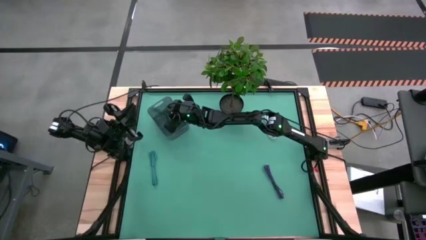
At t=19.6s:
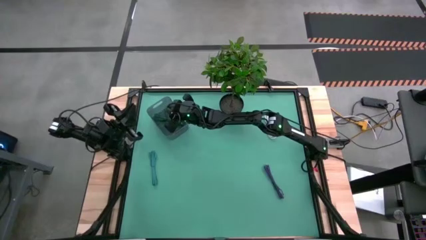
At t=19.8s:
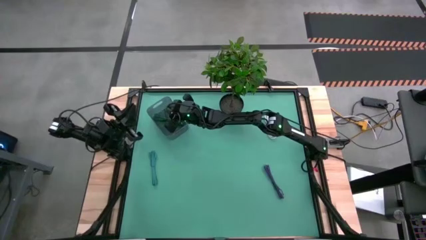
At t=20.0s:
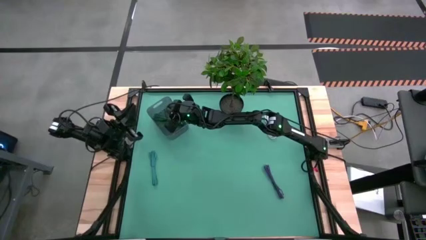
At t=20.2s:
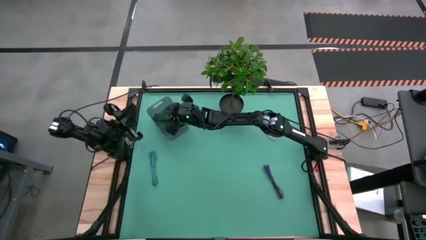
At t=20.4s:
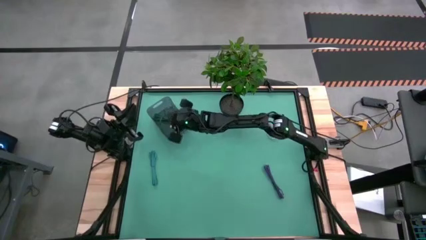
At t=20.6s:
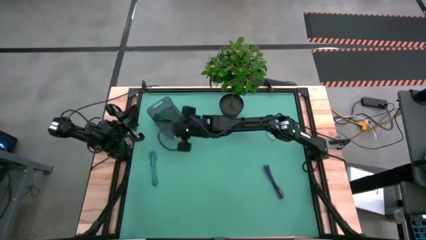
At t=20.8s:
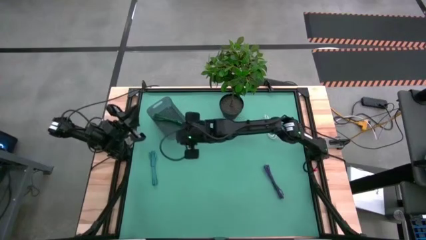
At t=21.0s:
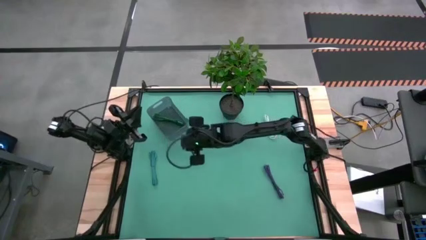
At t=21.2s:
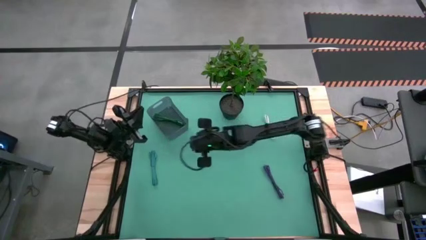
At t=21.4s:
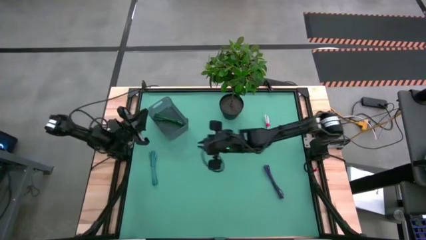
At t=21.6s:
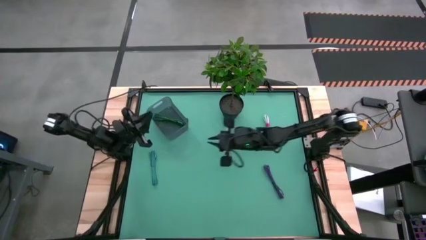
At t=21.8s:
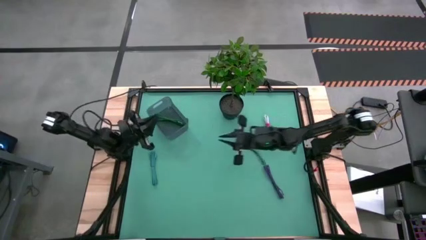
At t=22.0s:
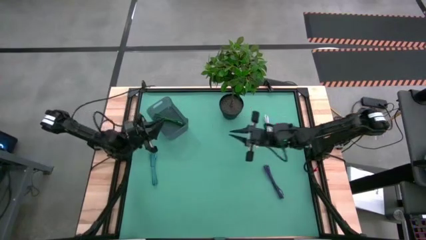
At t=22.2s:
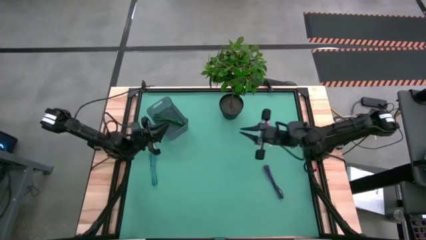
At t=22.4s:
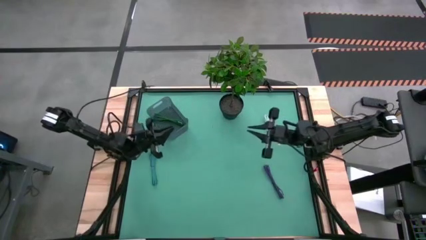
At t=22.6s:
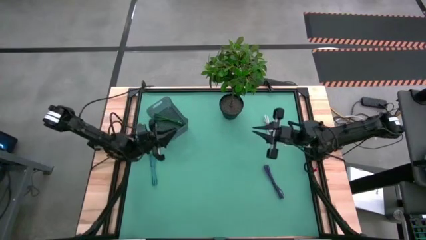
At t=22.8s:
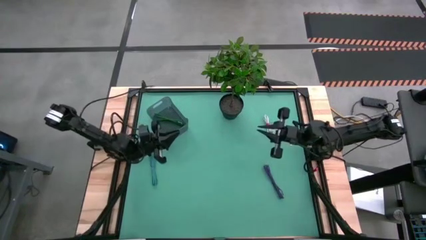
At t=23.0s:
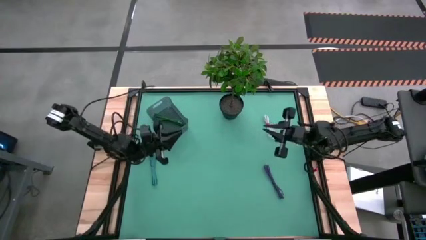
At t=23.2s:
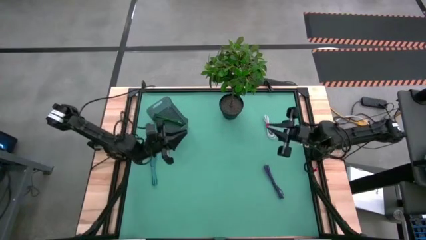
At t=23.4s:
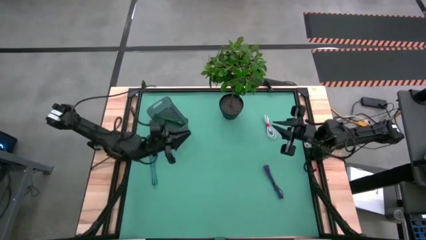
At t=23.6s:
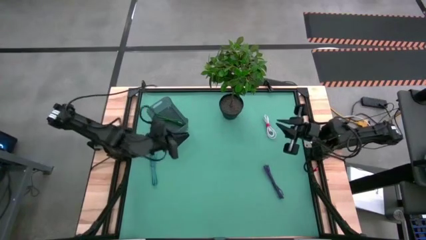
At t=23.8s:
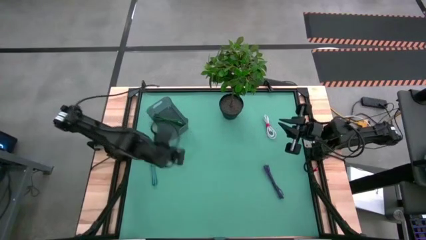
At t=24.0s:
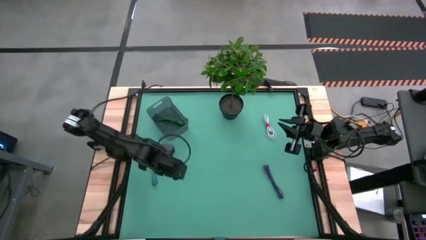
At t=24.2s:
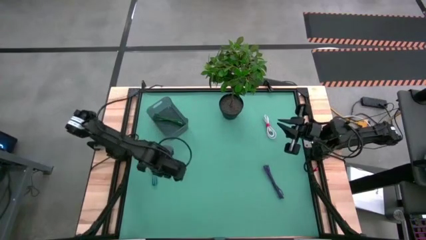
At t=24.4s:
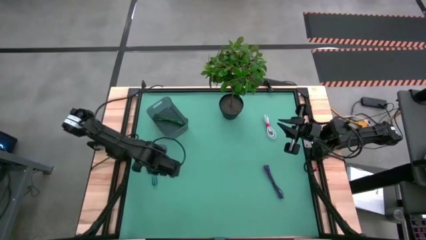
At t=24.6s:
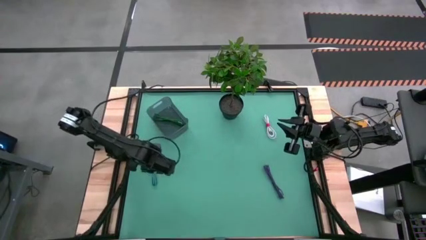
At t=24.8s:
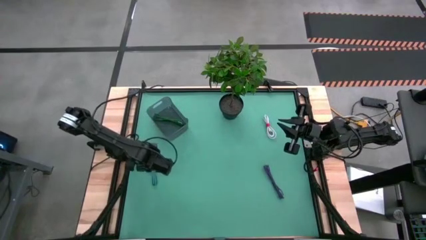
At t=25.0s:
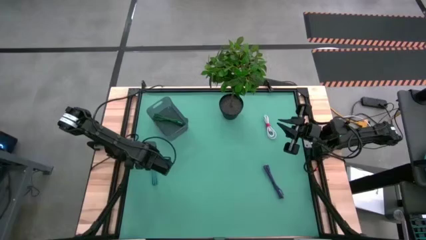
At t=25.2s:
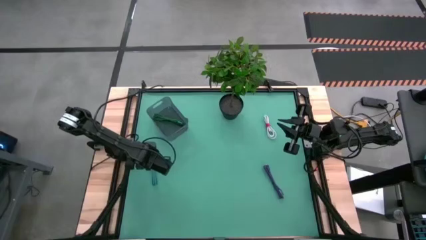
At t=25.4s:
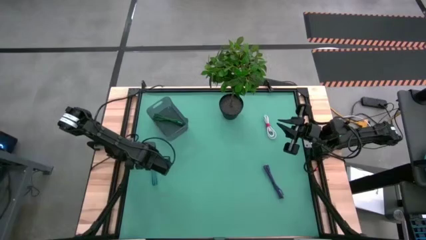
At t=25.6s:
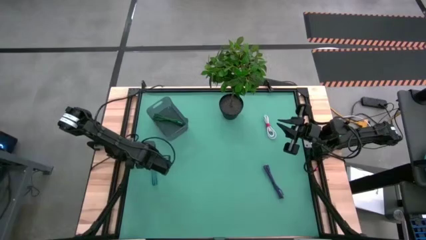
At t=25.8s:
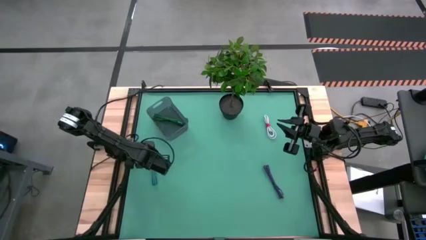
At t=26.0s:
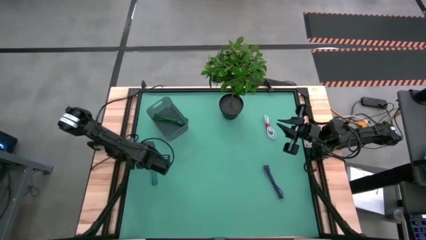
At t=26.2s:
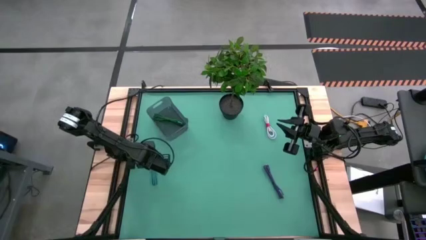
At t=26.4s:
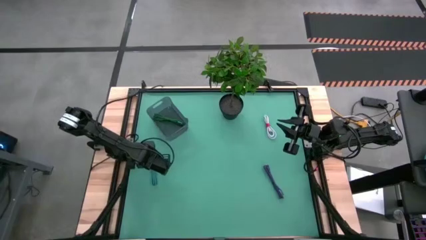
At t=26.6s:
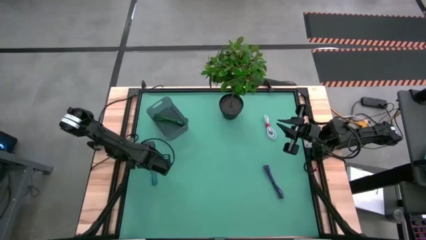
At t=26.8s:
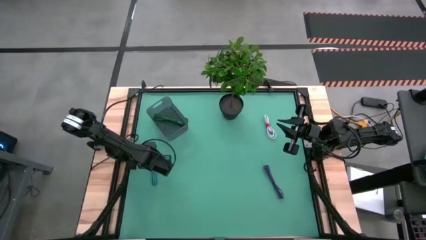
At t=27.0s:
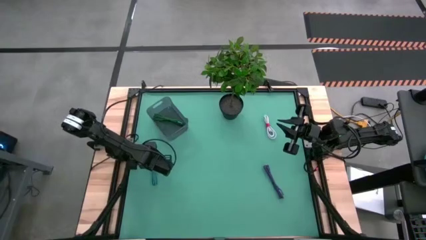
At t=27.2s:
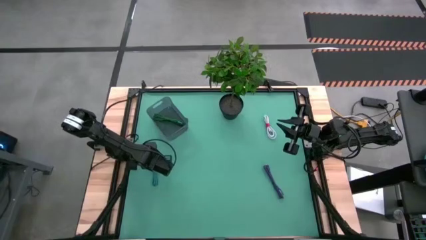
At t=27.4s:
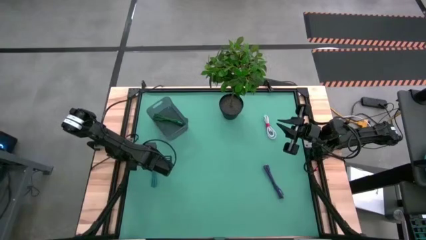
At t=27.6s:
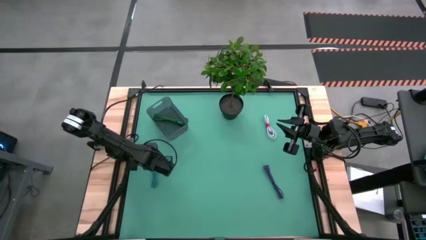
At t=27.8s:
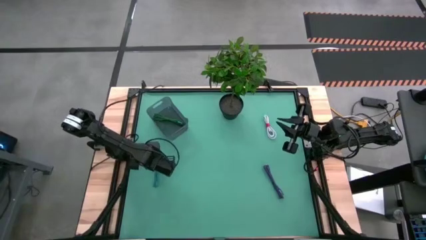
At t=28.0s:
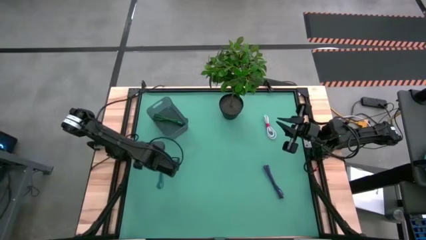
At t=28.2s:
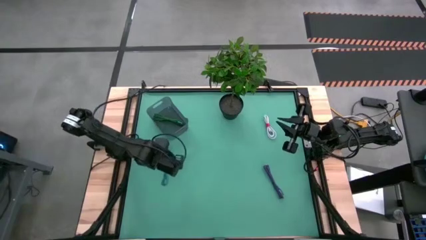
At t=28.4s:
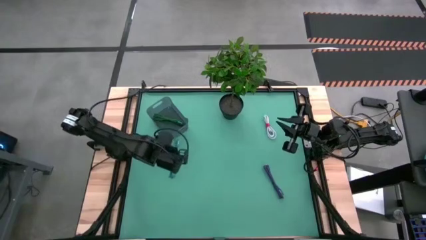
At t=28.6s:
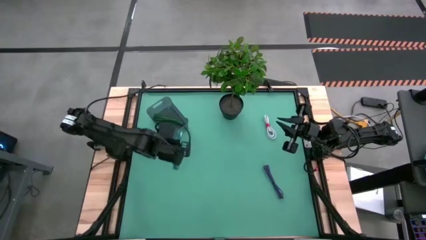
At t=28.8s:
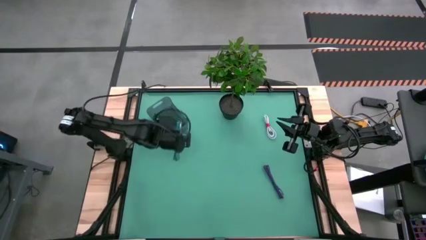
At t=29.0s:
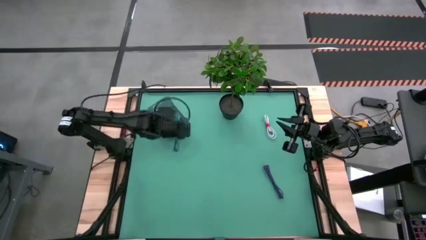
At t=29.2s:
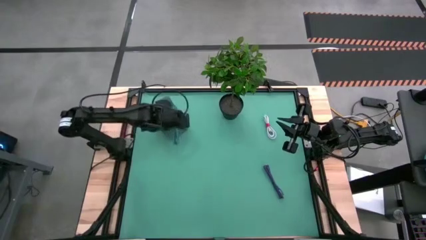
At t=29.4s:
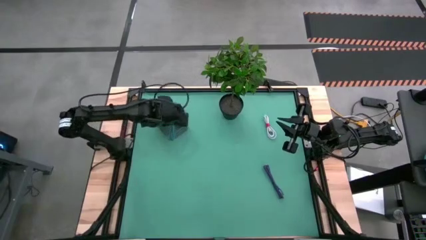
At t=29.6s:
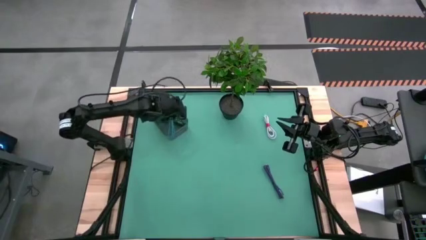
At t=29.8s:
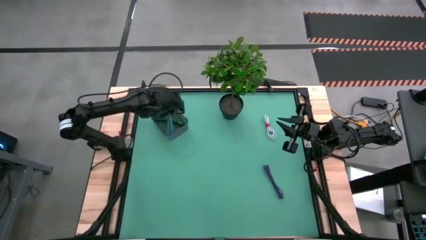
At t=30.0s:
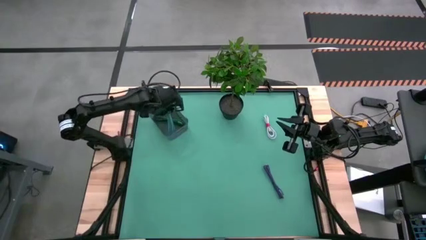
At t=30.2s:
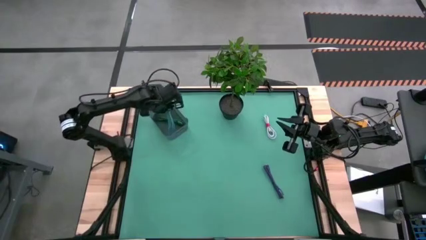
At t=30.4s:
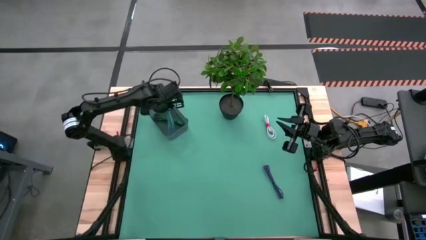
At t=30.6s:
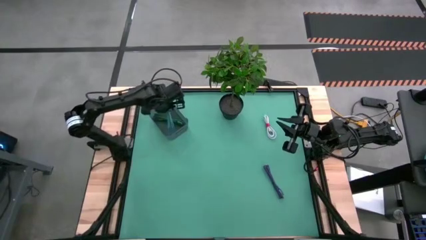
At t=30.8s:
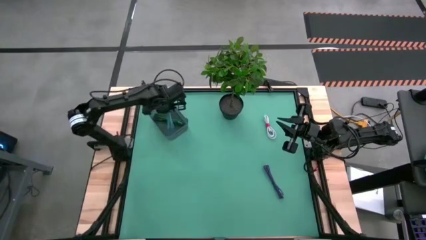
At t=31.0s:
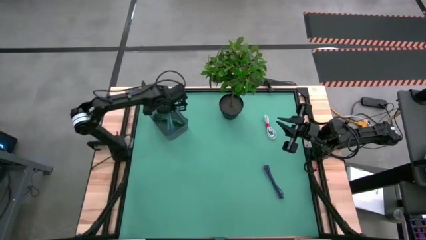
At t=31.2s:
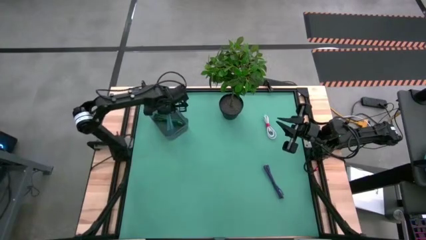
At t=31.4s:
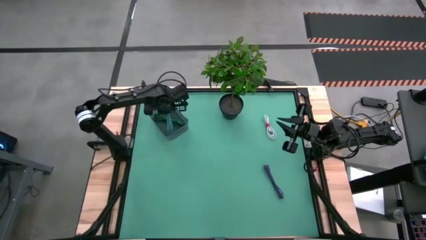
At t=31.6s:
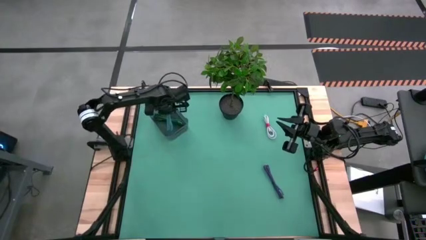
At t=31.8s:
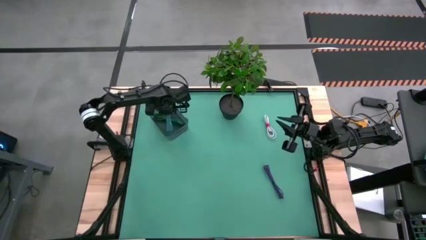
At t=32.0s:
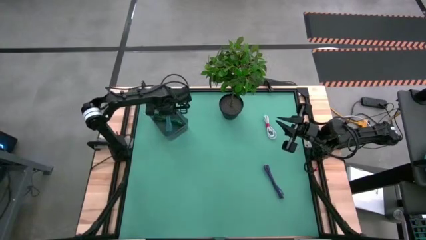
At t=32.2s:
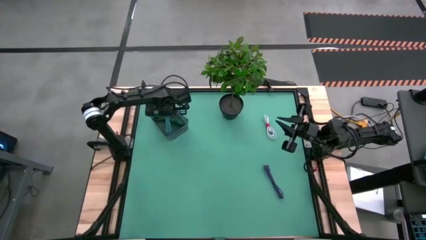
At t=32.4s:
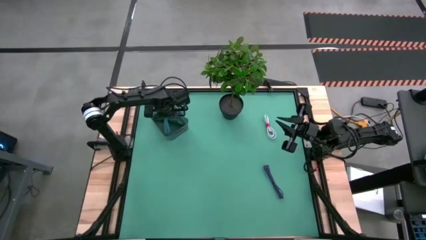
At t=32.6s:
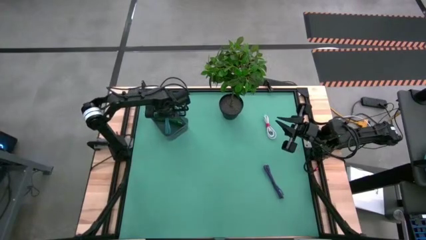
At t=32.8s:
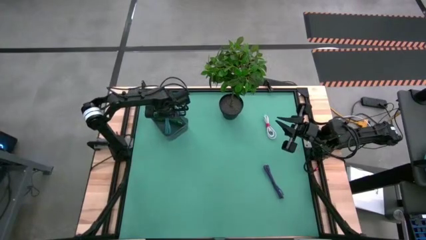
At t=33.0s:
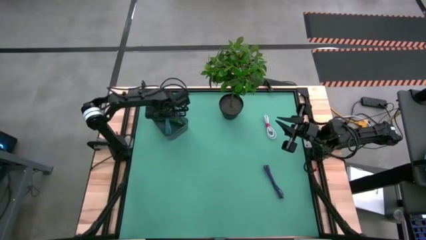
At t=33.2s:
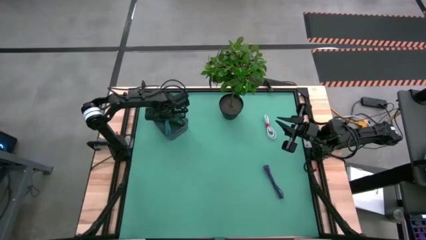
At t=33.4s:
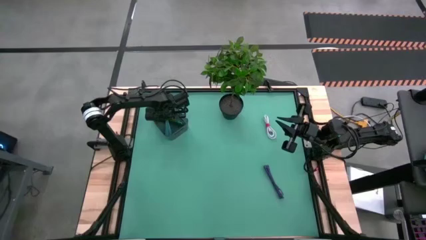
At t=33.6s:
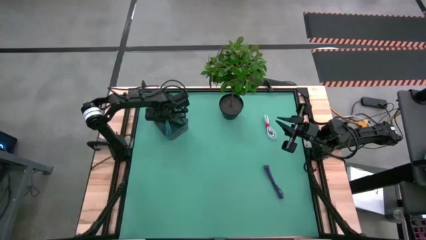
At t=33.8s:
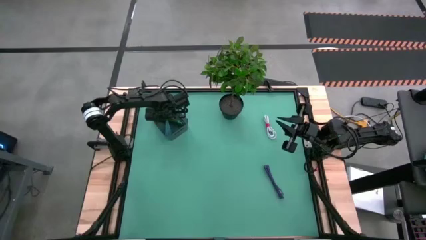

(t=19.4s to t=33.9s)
Task: Pick and place USB-C Cables
Put the blue charger cable into the gray bin

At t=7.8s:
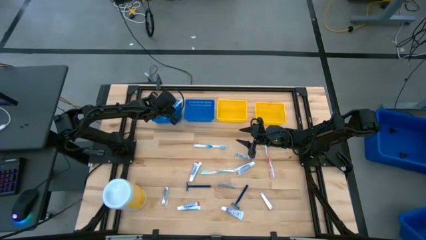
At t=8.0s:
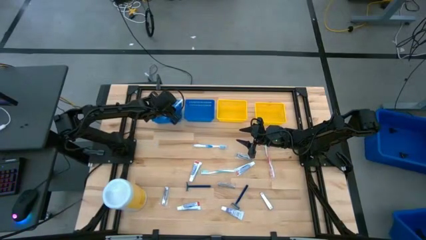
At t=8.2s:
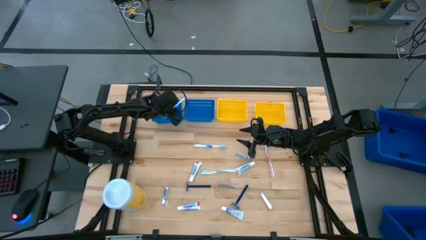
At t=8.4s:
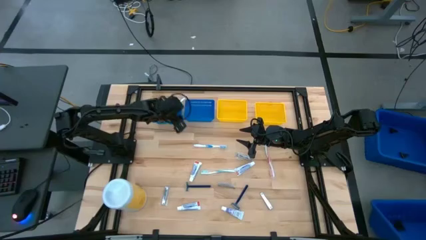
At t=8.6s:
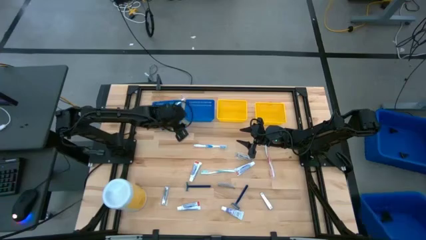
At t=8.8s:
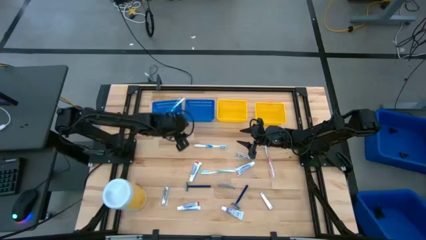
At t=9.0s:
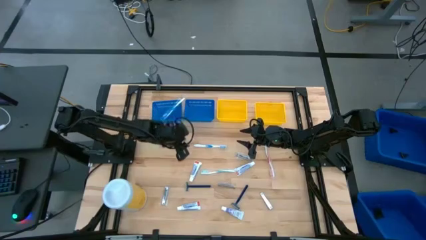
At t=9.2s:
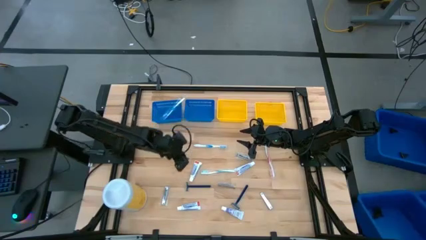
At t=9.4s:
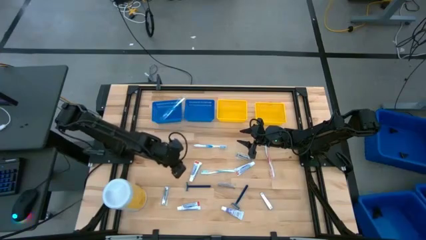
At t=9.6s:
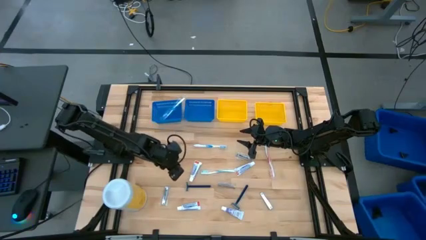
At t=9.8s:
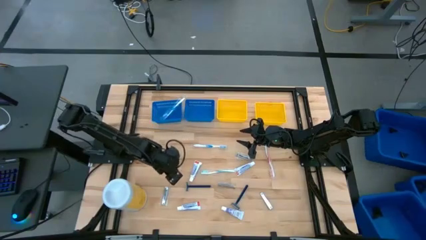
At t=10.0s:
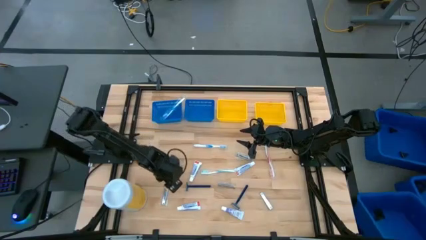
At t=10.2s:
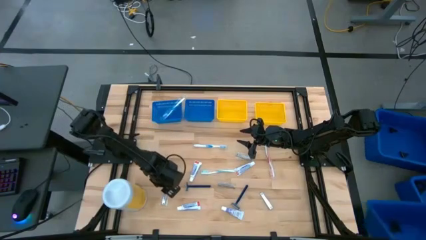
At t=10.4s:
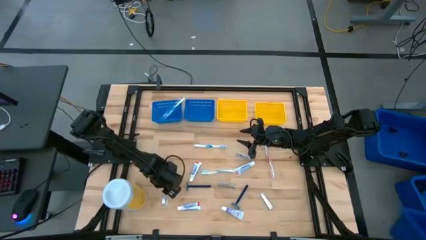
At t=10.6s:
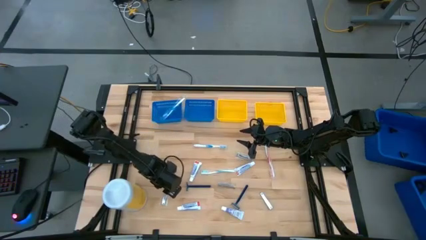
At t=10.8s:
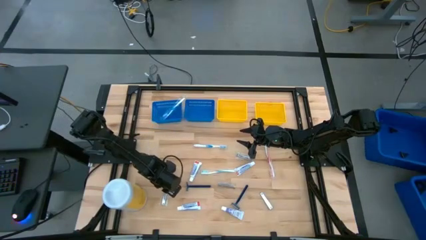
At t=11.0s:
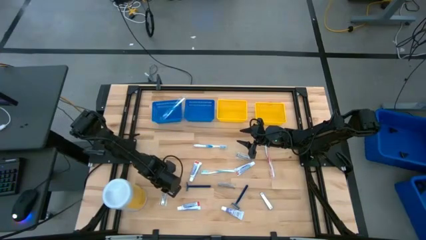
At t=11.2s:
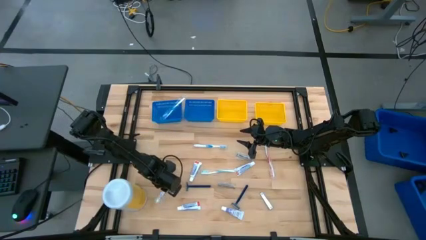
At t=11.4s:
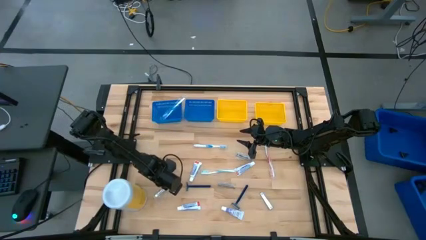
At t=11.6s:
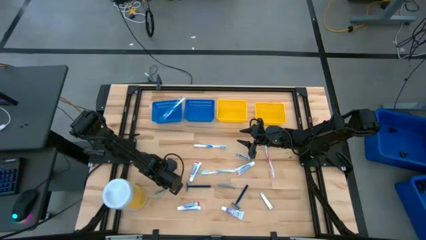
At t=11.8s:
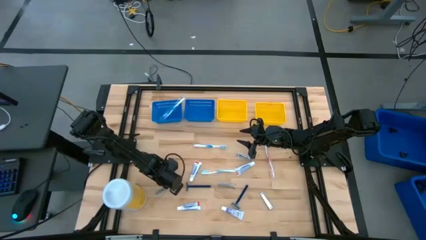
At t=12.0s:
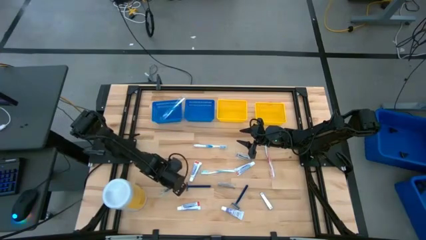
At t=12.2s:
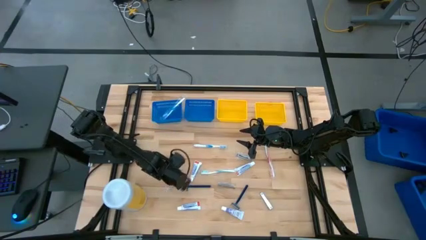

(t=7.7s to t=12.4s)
Task: Pick & Place Travel size toiletries
Put the silver nail cutter into the right blue bin
